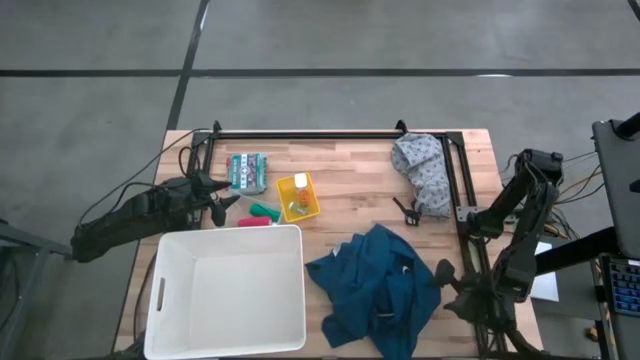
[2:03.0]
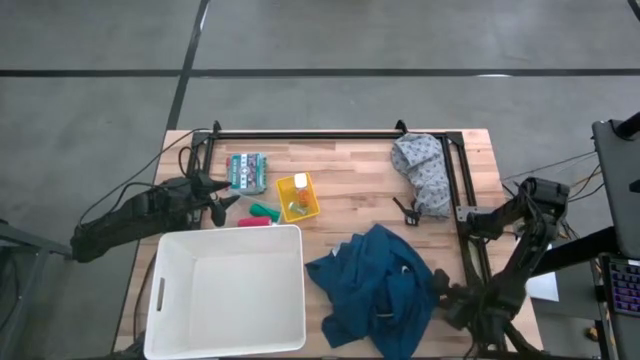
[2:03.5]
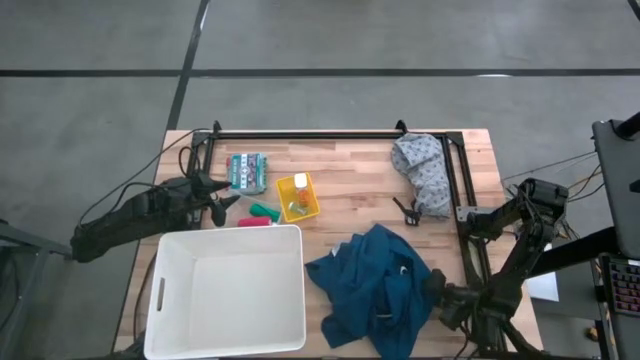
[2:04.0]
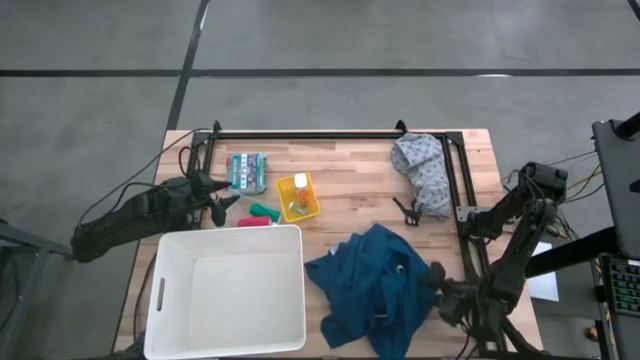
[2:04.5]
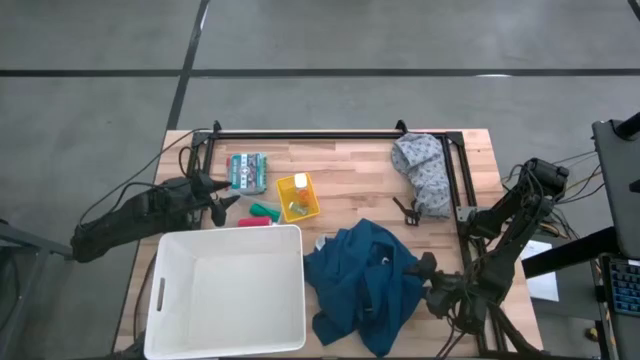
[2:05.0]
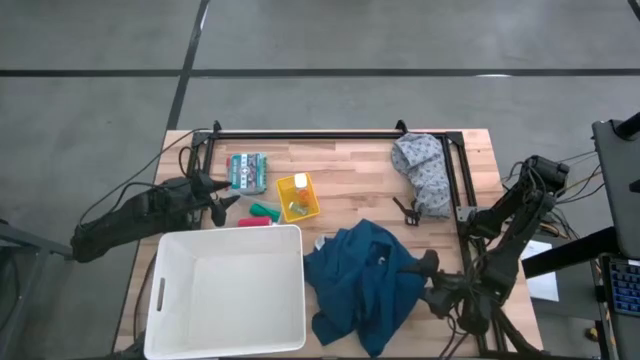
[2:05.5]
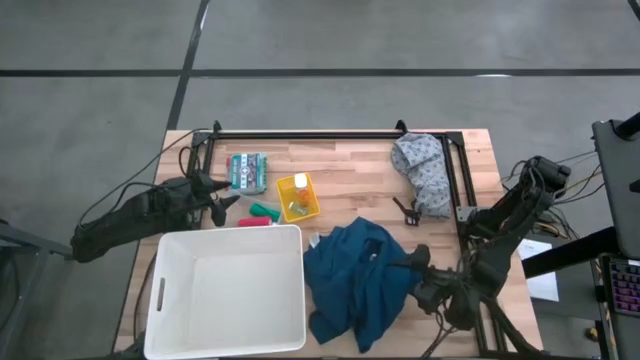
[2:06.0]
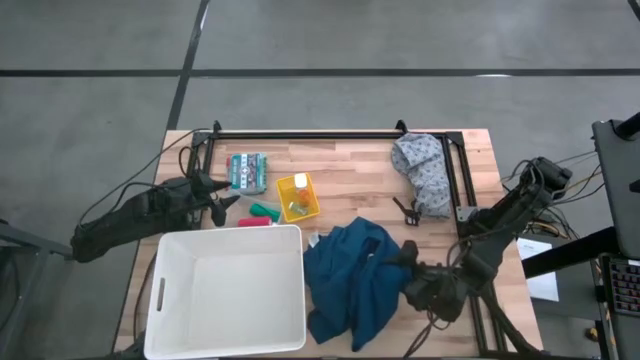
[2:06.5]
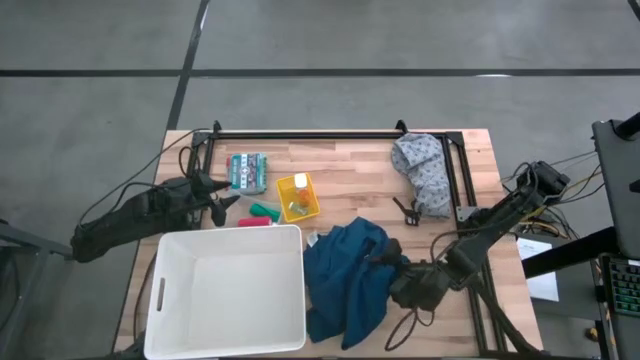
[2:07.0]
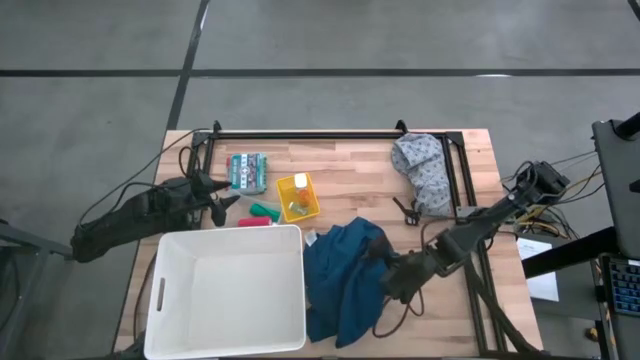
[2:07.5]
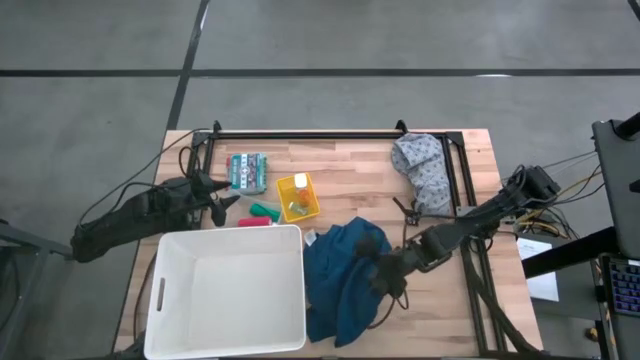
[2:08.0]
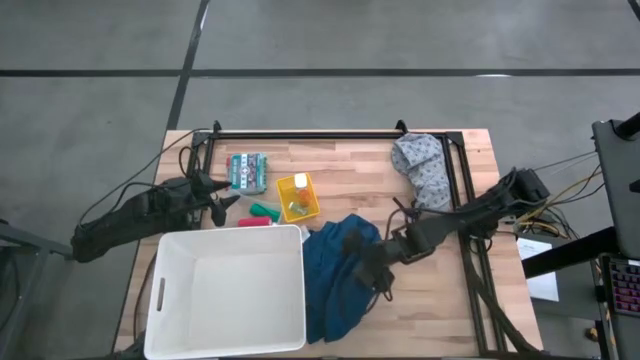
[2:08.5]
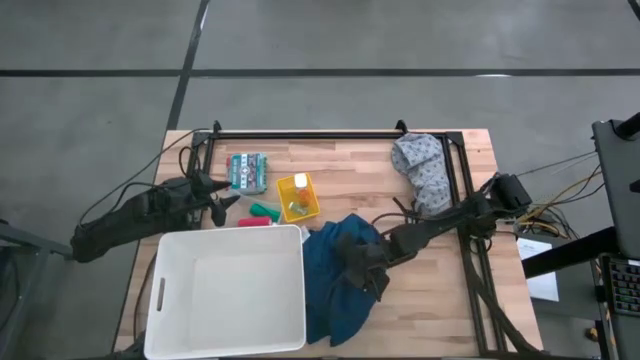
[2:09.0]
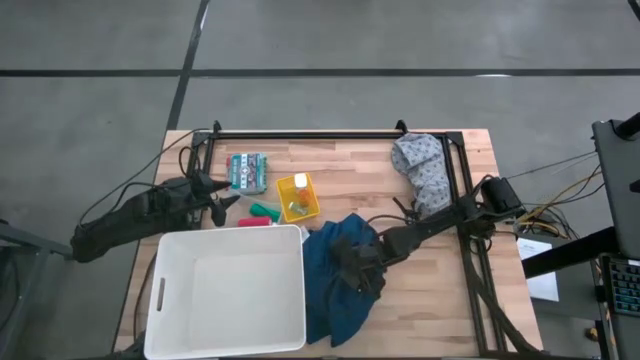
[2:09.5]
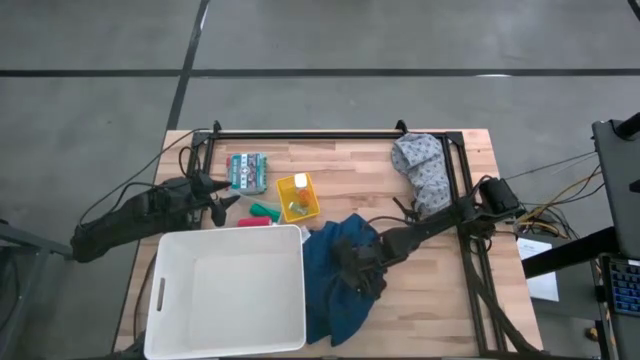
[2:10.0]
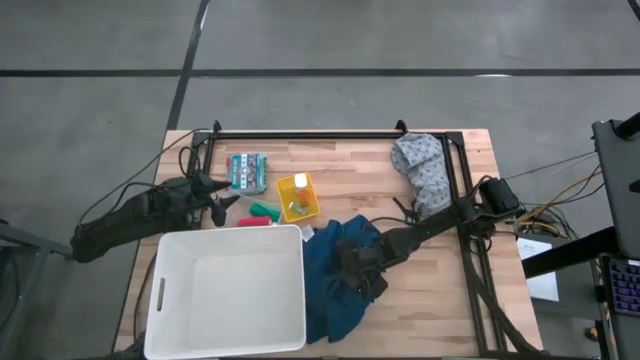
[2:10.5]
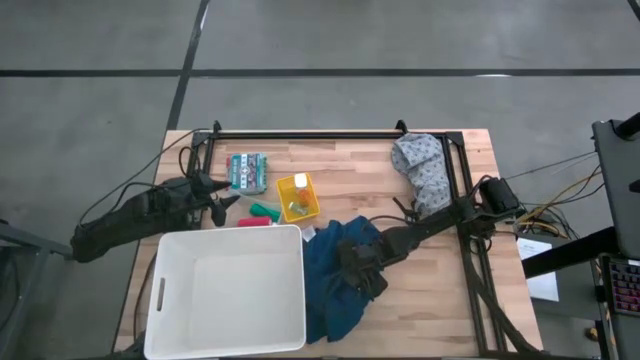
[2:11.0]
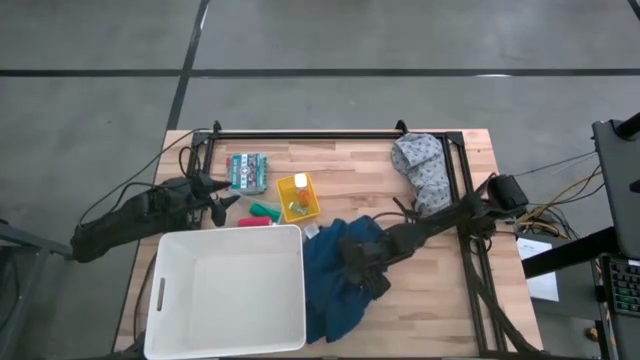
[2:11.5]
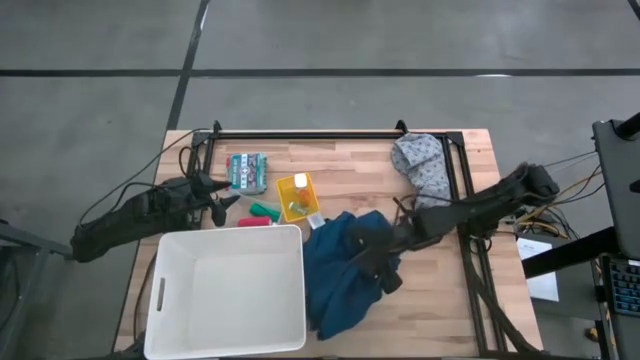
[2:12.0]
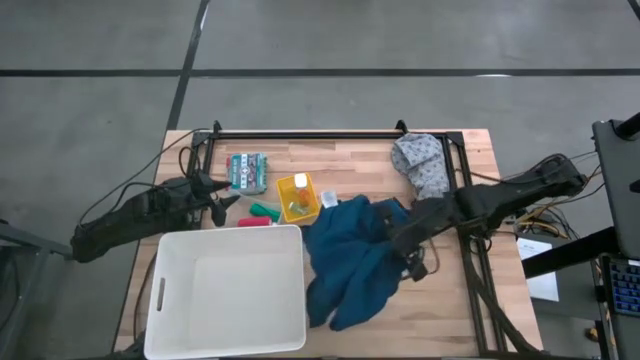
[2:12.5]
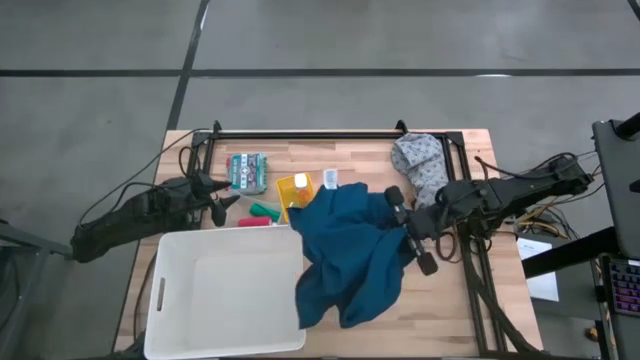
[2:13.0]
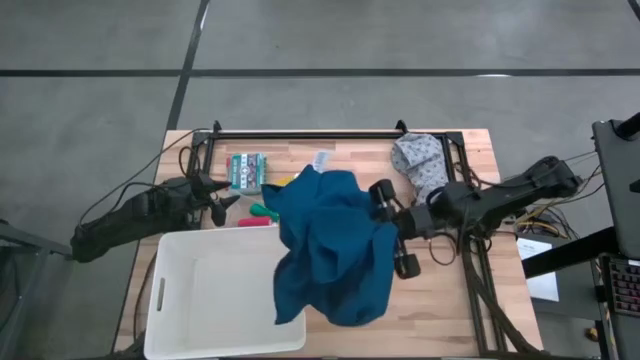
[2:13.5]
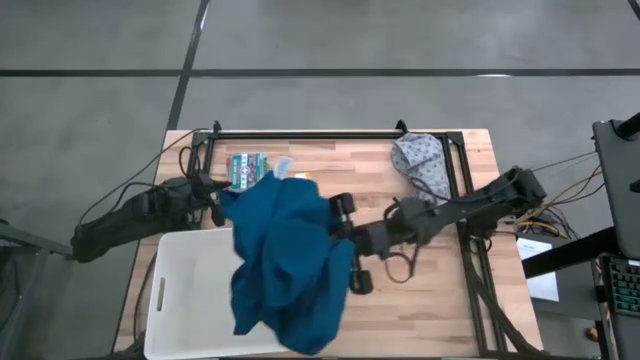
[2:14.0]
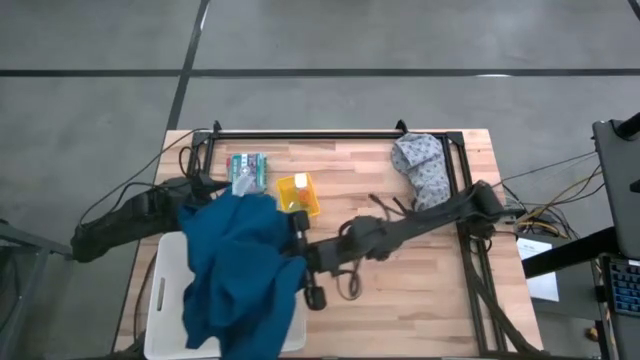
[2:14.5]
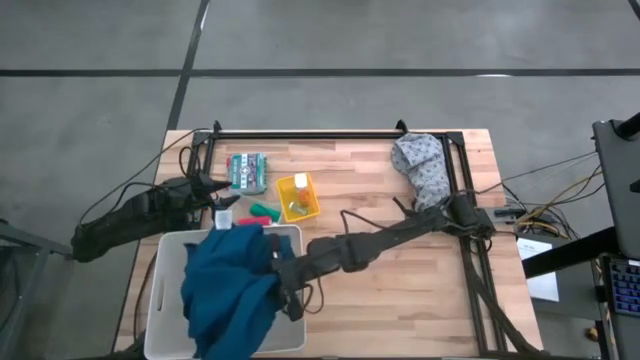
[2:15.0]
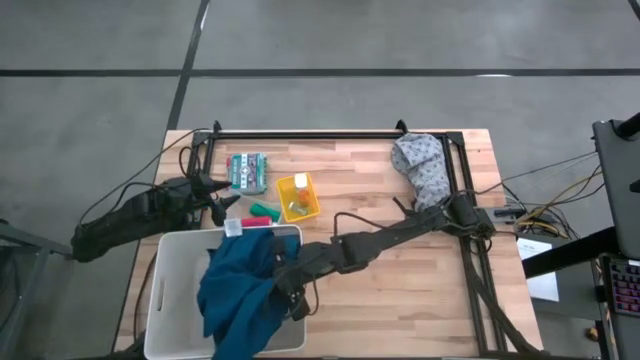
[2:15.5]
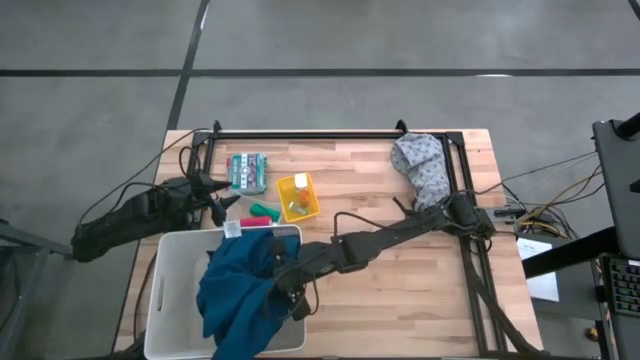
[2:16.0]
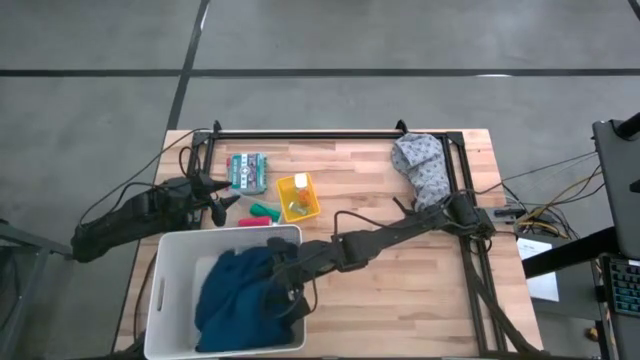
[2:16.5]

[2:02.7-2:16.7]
Task: Pick & place medical supplies in basket/bin
Put the blue patient gown into the white bin

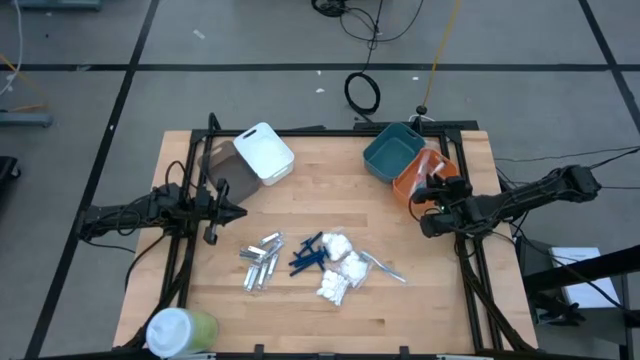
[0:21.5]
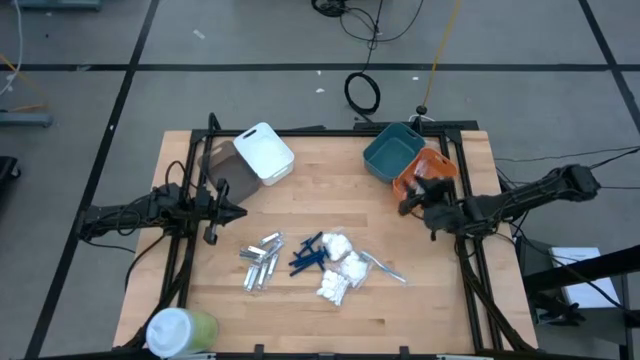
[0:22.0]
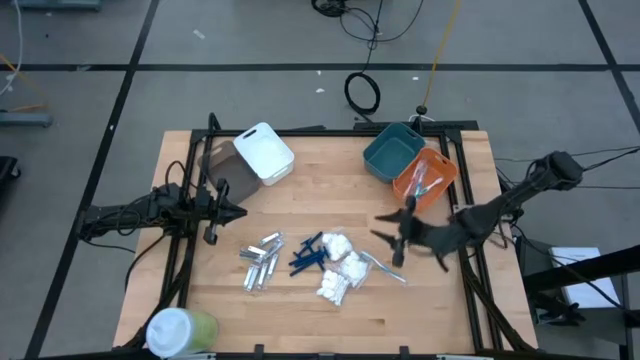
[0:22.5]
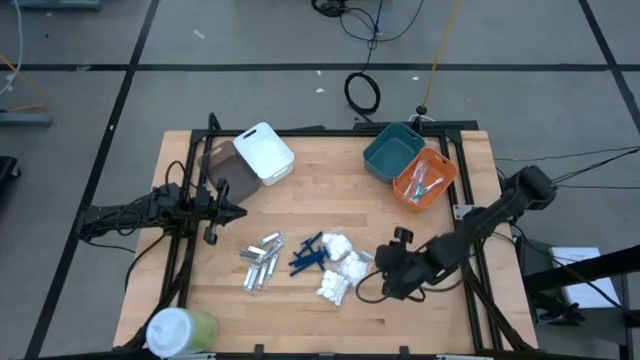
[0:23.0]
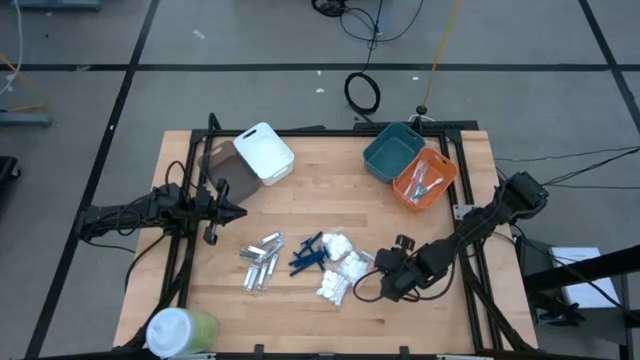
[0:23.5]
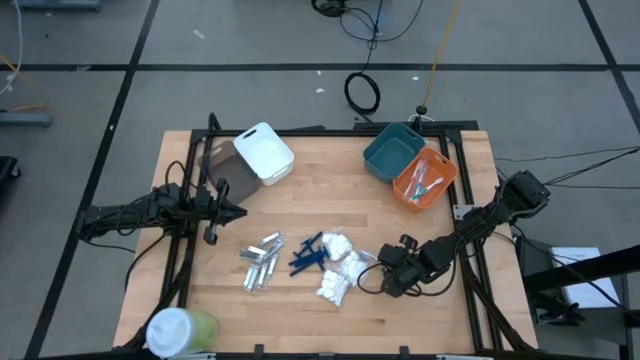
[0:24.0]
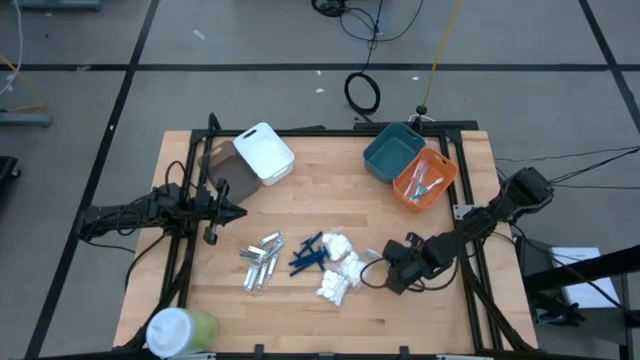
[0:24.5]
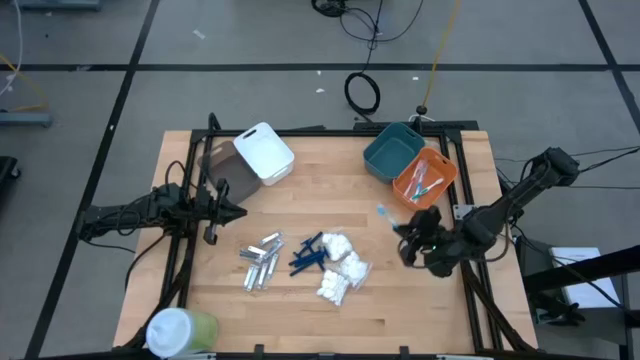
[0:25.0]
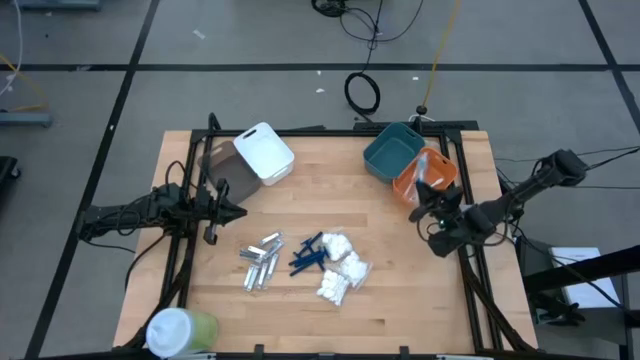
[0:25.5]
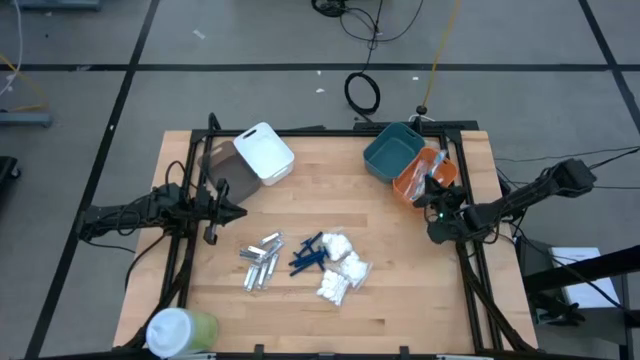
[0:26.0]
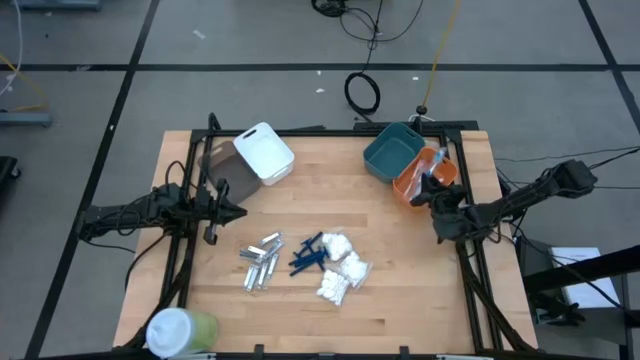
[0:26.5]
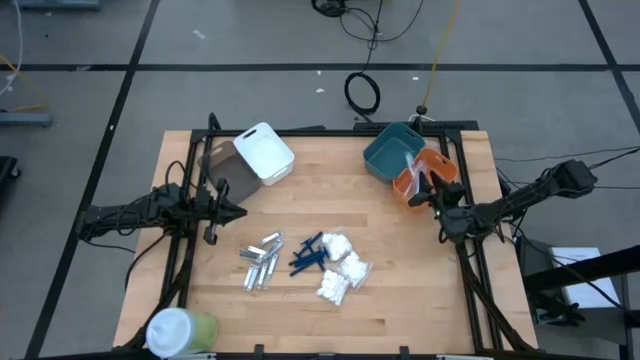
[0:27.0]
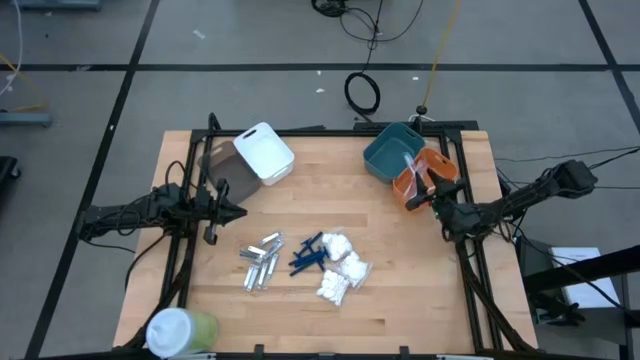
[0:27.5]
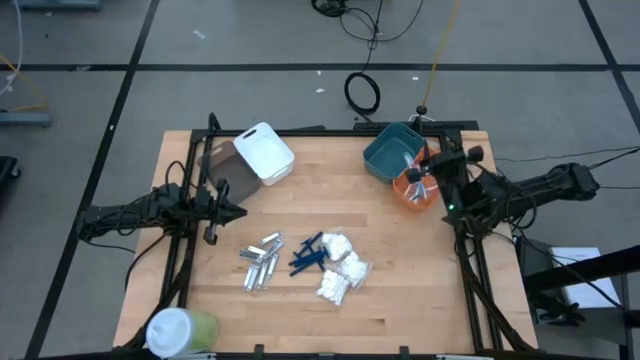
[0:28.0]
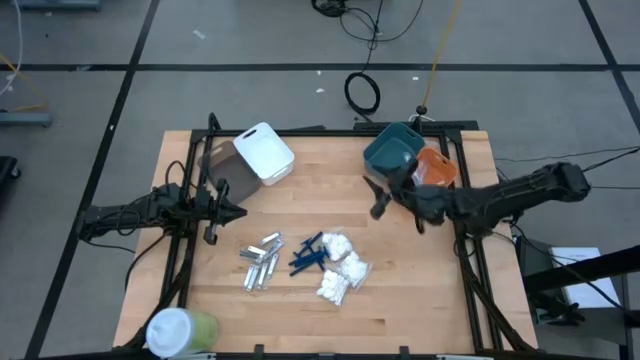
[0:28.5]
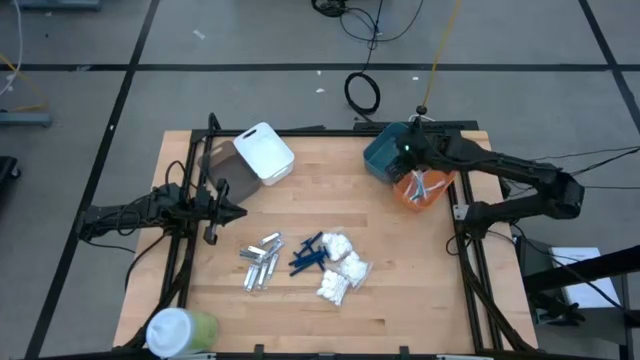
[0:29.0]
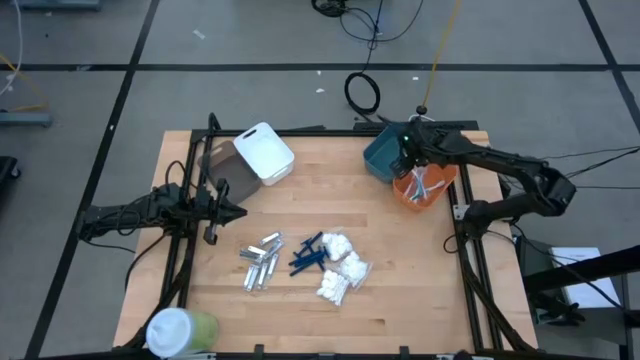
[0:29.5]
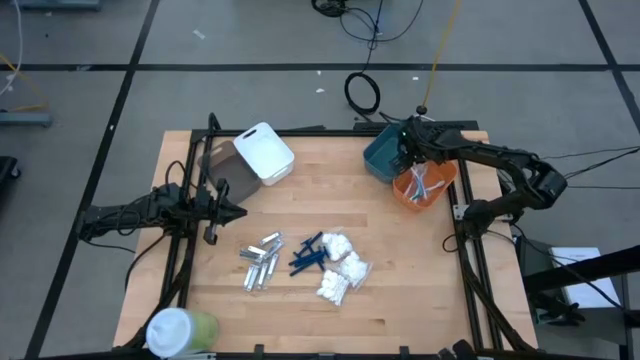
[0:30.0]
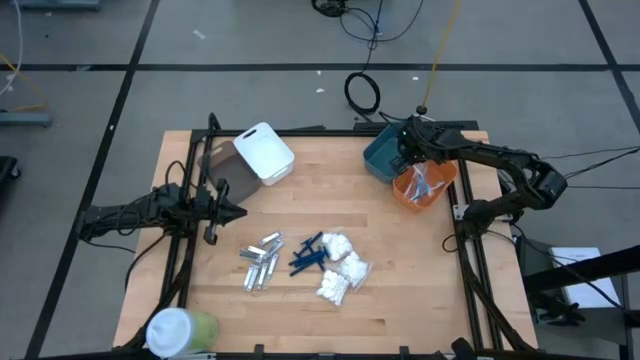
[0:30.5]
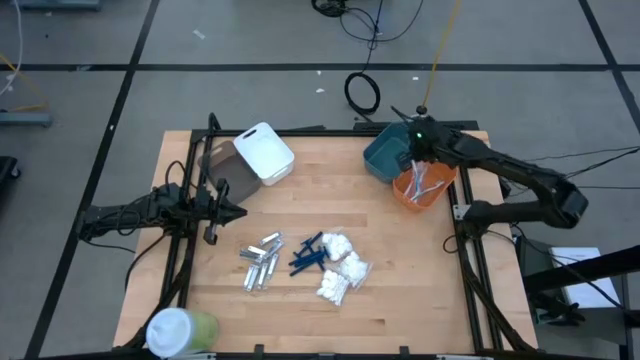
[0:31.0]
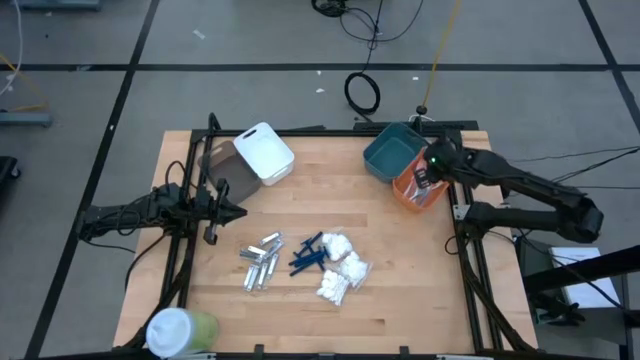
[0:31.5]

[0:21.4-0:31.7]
Task: Pick & Place Travel size toiletries
Put the blue toothbrush into the orange bin
